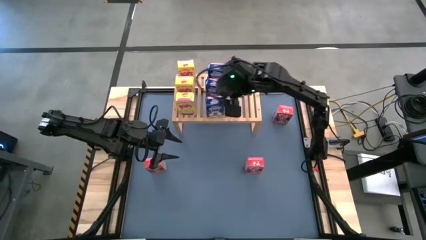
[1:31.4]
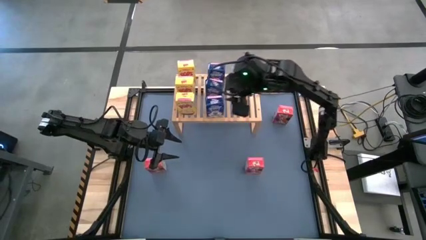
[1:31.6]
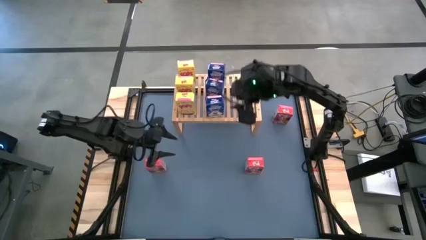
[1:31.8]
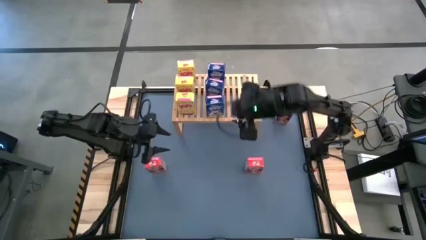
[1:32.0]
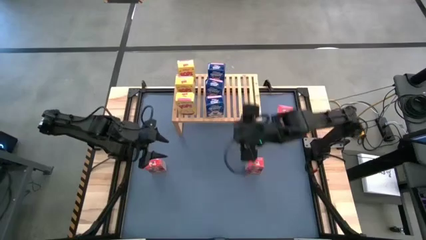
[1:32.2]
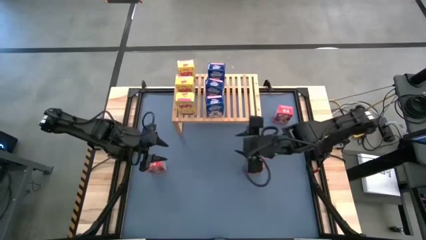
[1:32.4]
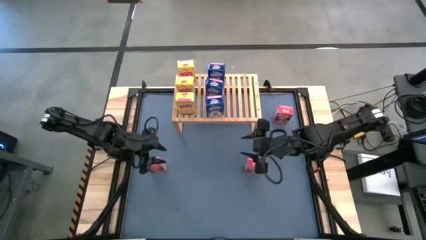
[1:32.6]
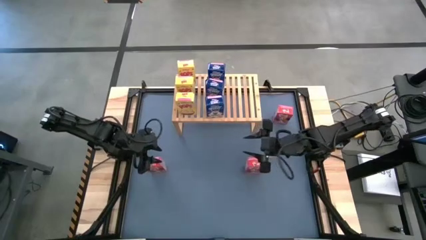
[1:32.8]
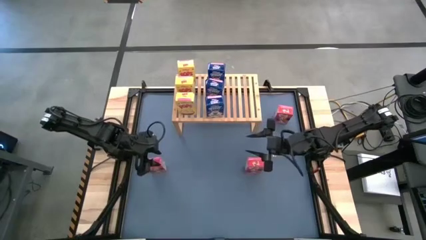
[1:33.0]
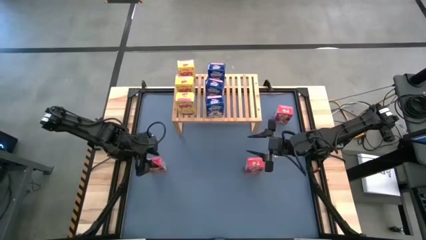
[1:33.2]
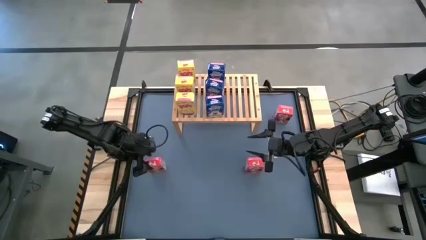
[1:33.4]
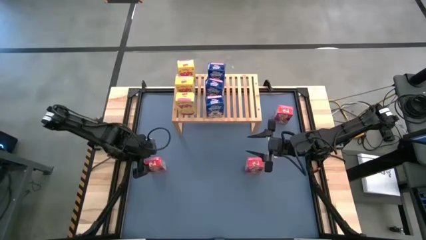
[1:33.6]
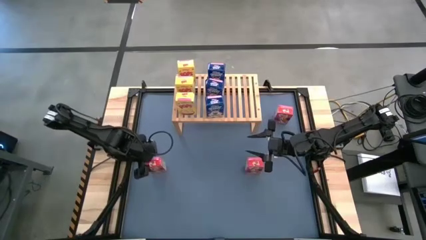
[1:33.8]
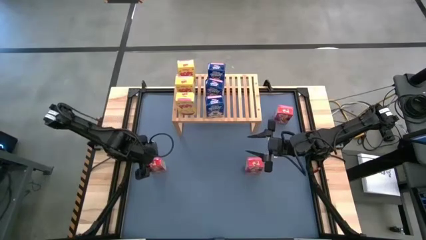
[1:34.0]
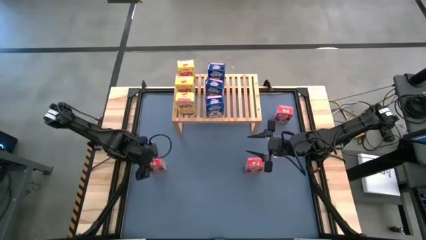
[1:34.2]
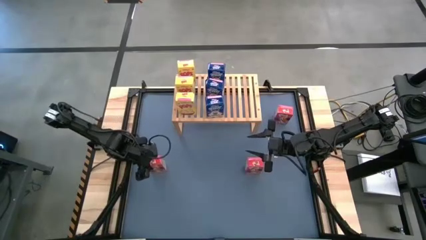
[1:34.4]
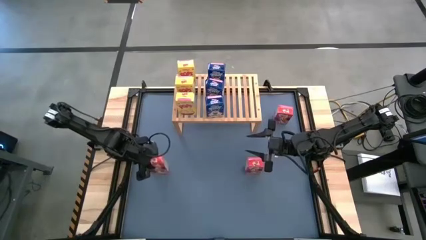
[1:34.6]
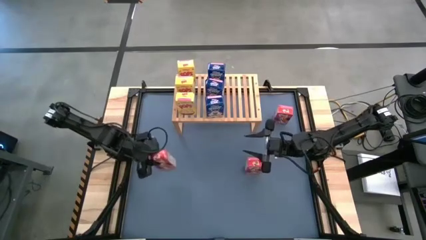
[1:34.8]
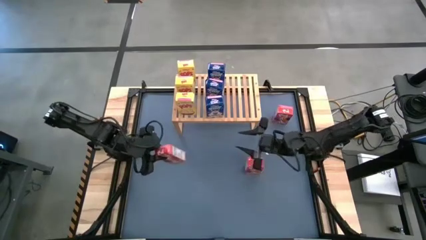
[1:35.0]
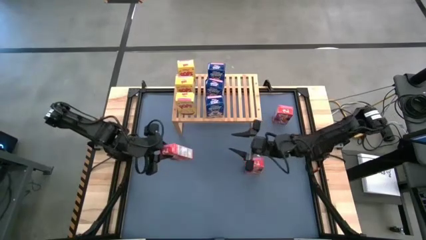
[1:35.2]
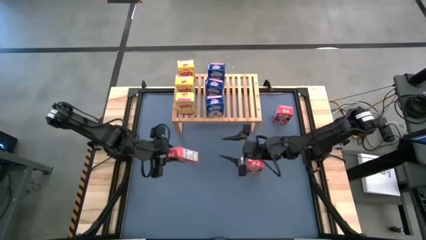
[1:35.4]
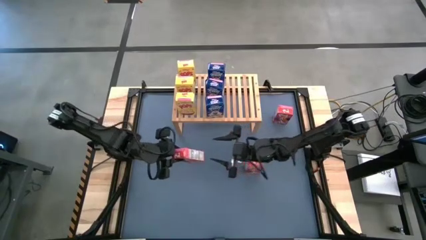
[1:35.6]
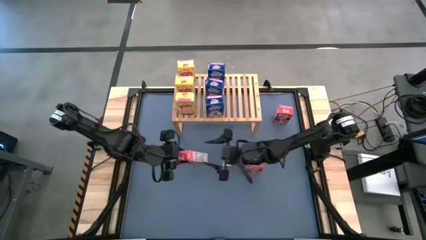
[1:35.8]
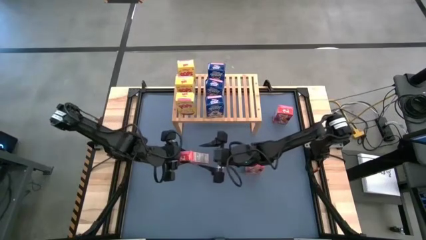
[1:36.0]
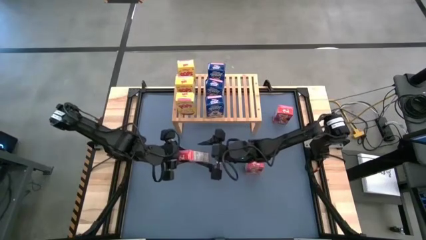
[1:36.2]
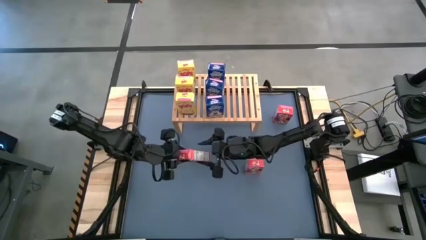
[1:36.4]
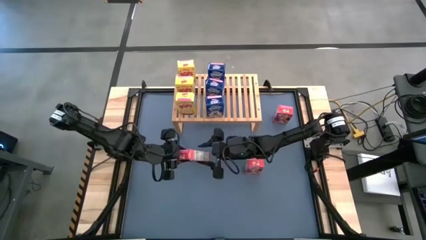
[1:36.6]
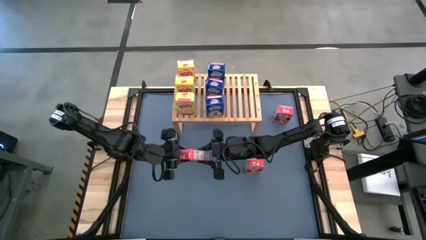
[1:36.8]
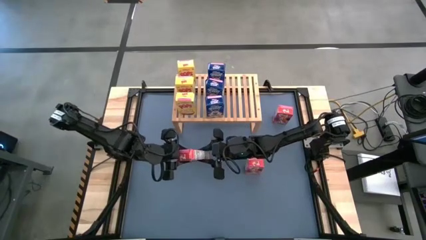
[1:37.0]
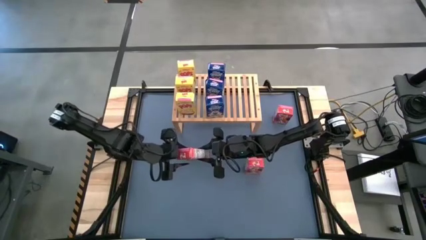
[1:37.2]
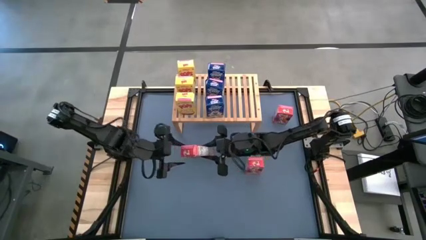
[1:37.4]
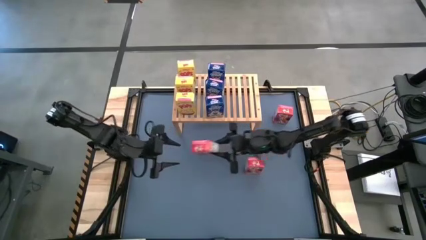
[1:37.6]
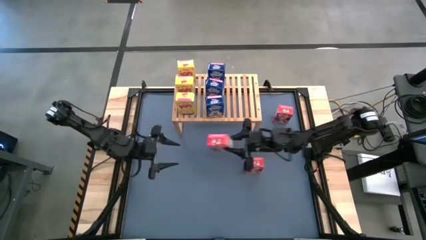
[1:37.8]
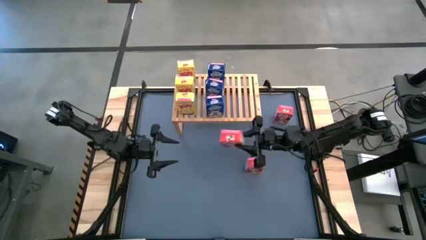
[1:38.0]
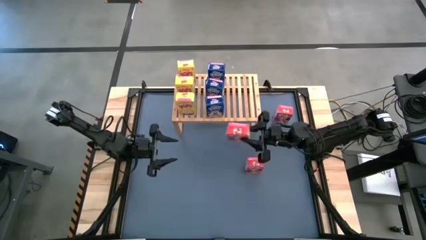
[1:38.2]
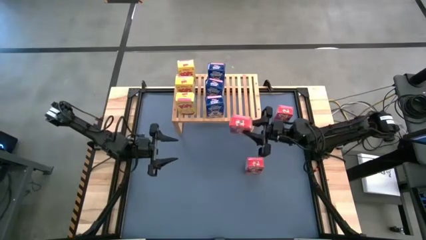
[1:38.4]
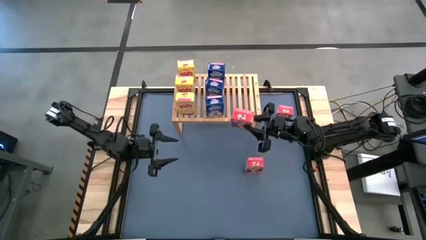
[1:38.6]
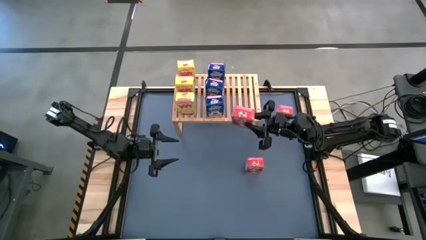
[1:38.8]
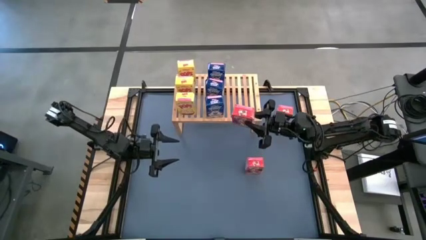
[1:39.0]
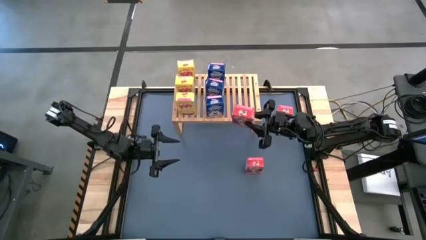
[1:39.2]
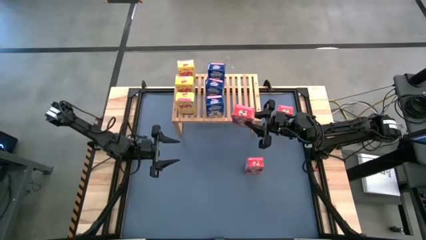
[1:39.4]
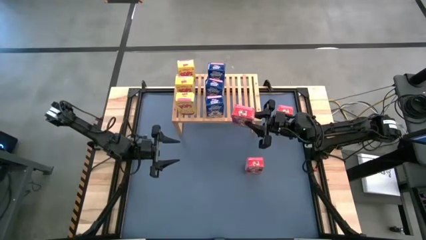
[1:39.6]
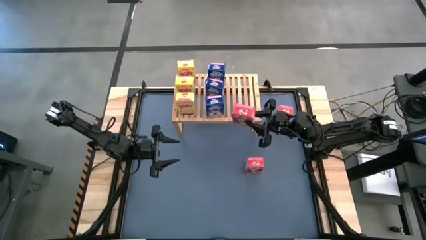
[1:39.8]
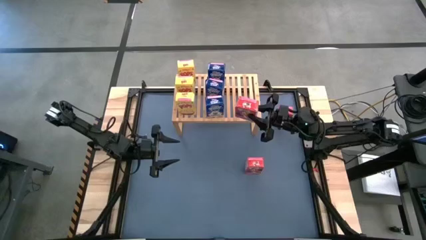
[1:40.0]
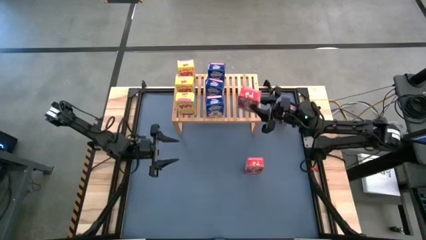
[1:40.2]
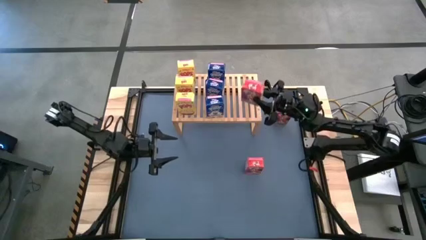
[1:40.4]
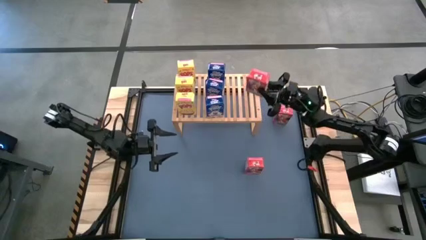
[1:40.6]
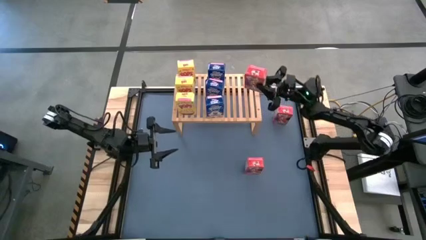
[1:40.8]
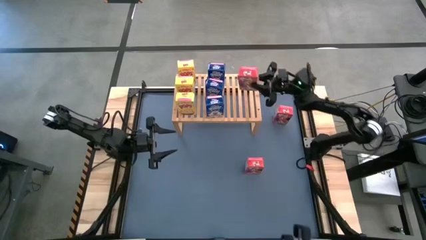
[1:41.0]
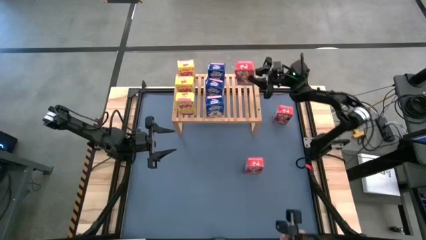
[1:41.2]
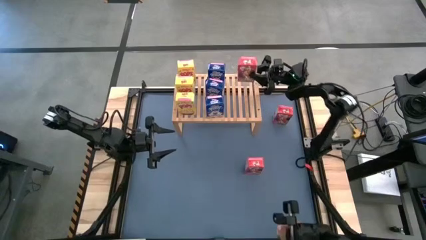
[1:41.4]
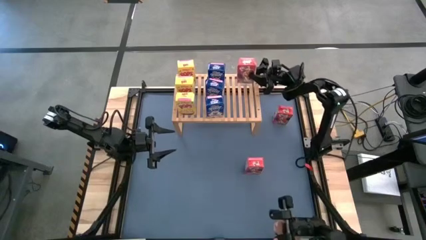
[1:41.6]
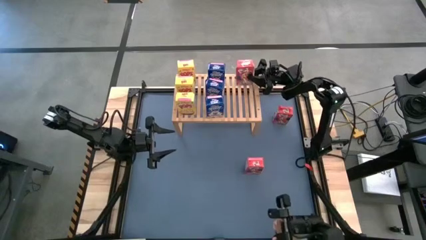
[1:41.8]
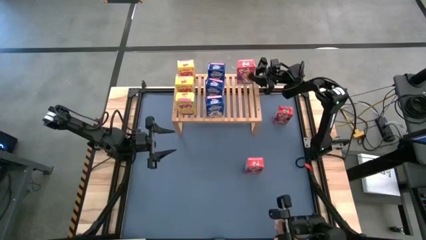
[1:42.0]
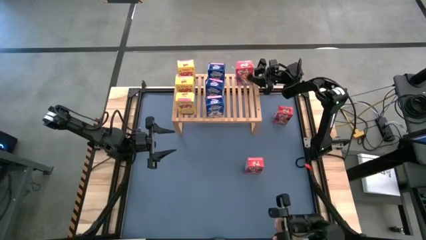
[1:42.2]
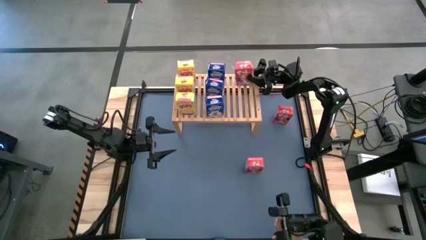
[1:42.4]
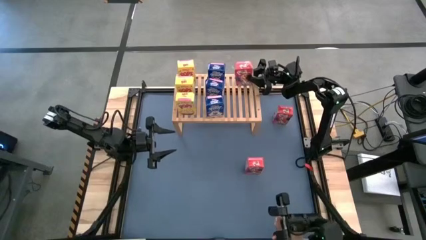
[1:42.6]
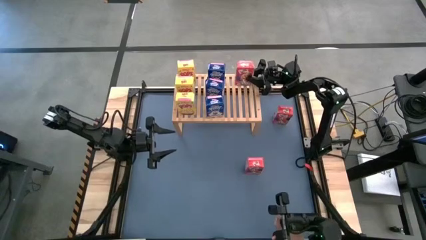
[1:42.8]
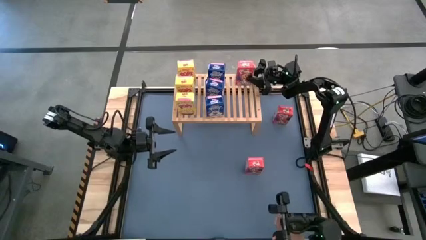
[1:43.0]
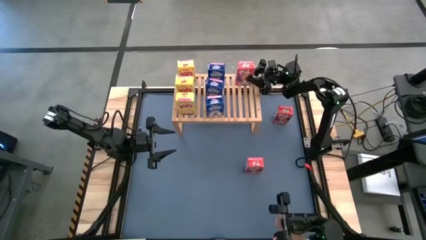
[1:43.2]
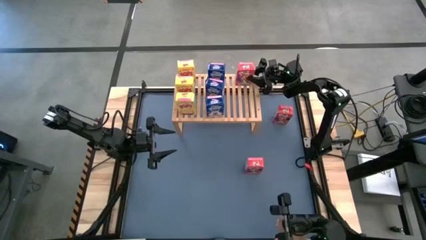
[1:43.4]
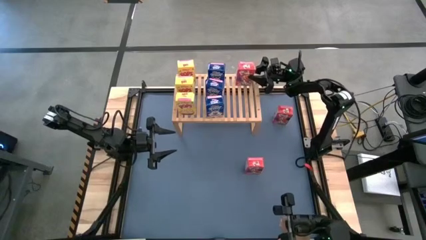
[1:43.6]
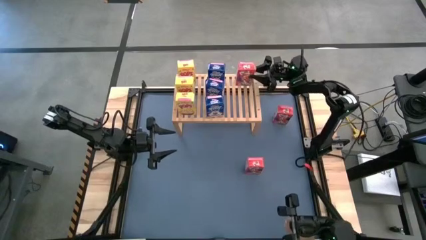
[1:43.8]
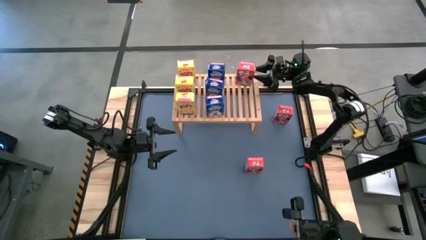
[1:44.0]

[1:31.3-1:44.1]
Task: Stack cereal on shelf
Put the bottom left red cereal box on the shelf

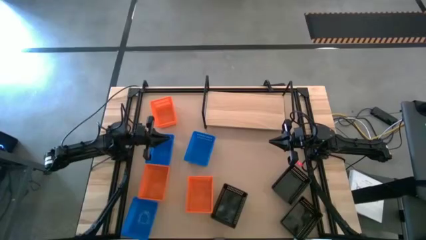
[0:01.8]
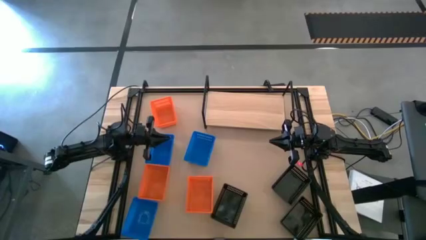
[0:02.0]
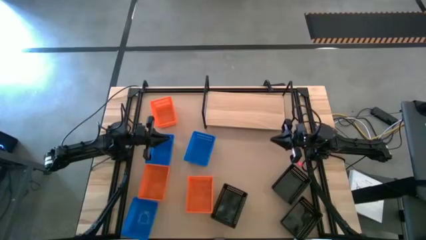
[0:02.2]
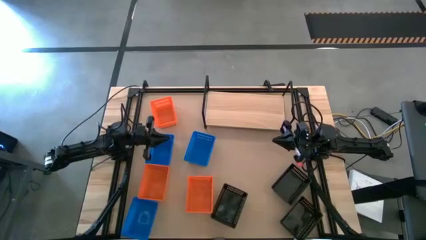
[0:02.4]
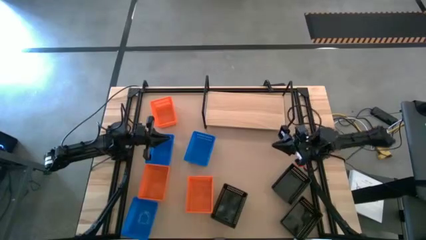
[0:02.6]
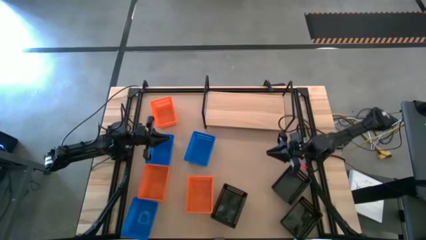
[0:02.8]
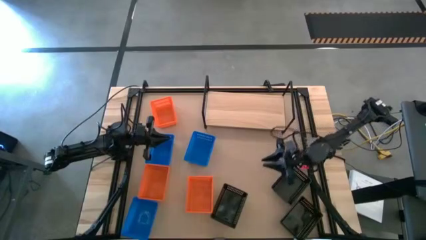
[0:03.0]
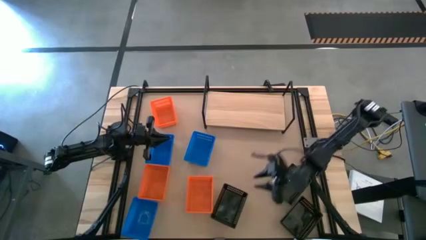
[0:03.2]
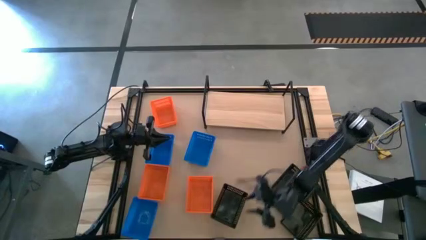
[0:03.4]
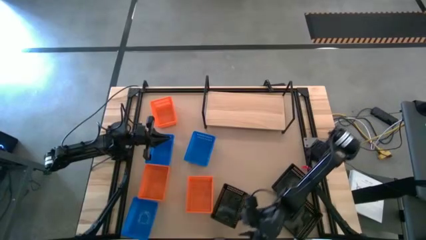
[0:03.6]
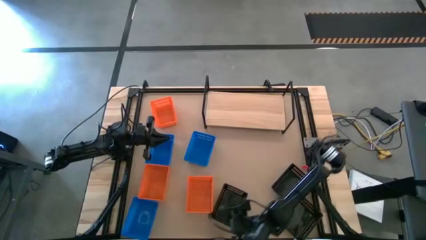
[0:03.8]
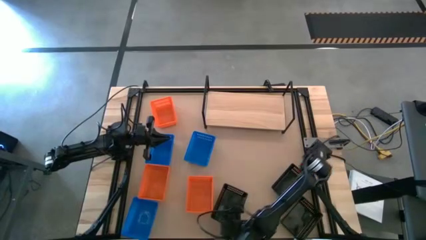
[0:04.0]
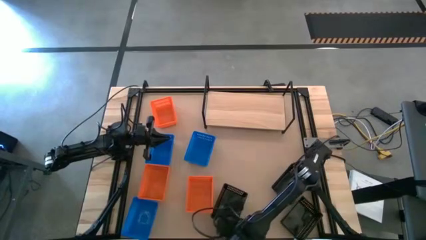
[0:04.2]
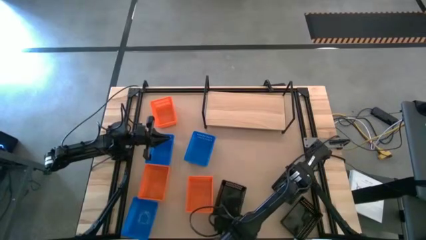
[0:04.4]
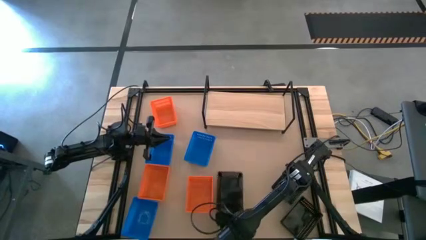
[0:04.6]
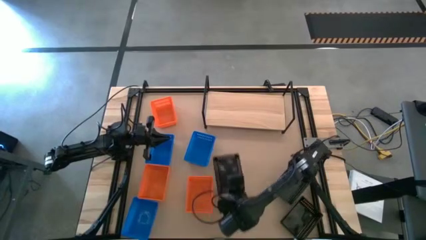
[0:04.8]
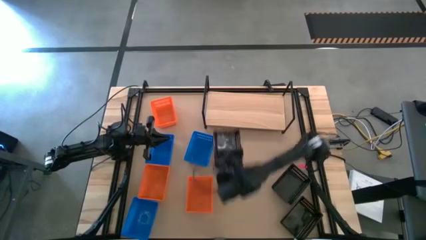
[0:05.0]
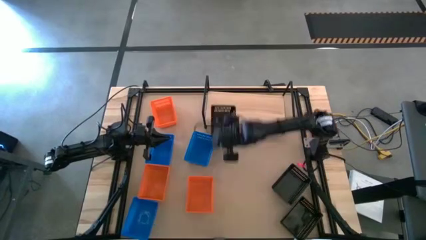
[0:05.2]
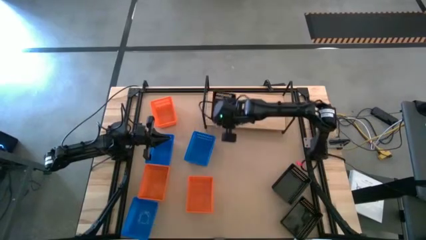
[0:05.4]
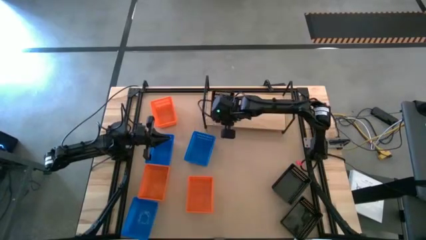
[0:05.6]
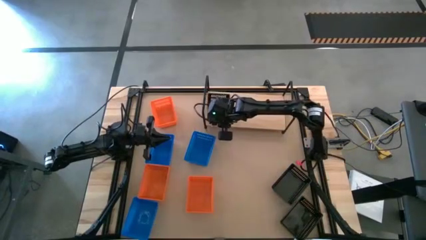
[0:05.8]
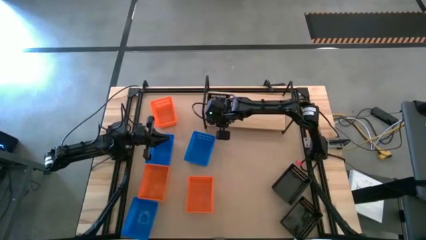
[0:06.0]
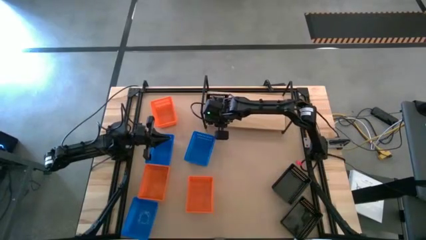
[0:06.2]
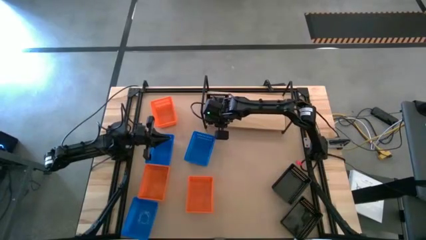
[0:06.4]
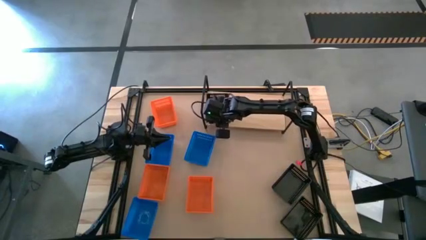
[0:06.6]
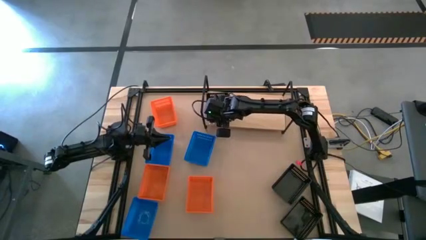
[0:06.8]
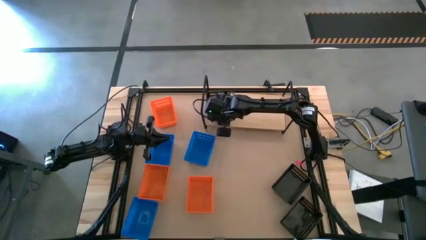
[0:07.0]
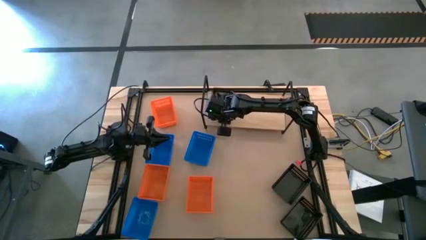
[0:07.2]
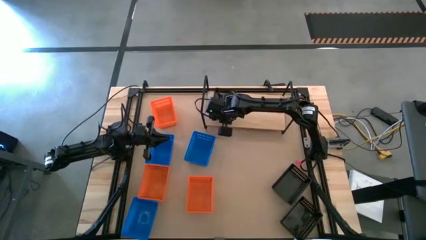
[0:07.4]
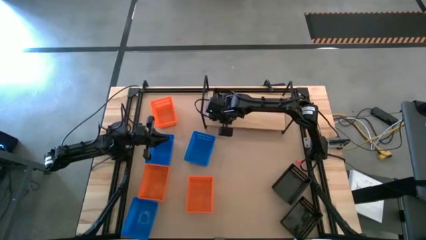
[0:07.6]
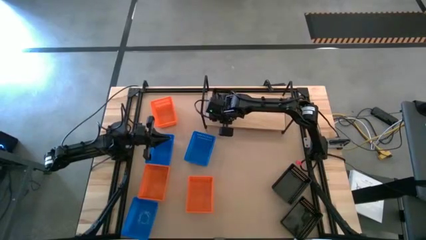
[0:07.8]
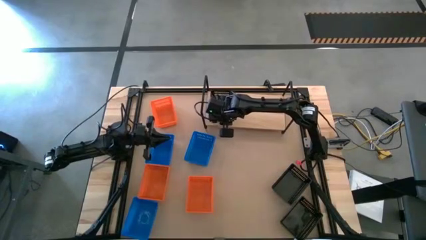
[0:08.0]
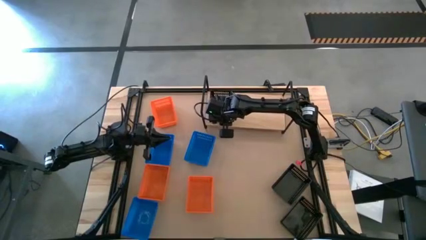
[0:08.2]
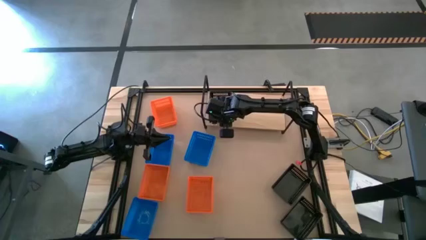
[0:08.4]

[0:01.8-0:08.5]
Task: Stack baskets on shelf by color
Put the middle left black basket on the shelf
